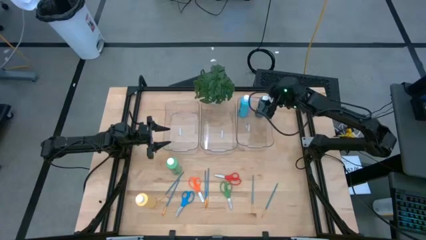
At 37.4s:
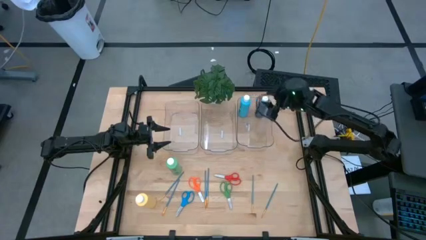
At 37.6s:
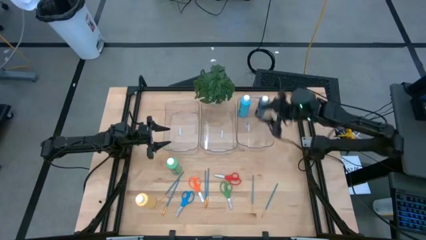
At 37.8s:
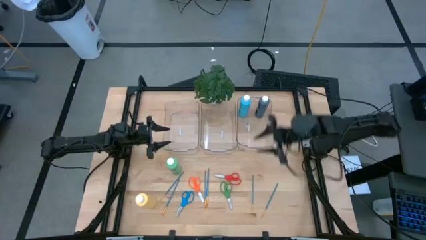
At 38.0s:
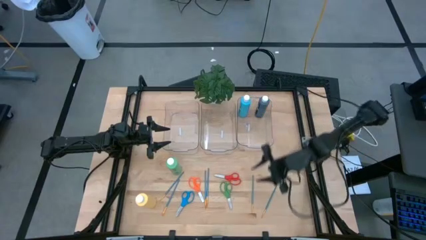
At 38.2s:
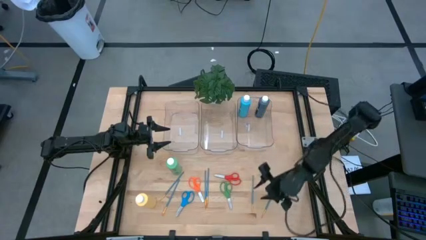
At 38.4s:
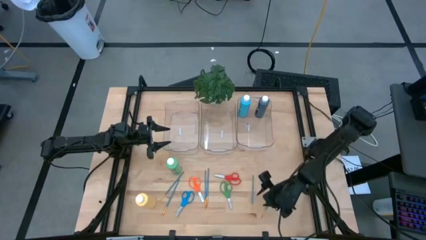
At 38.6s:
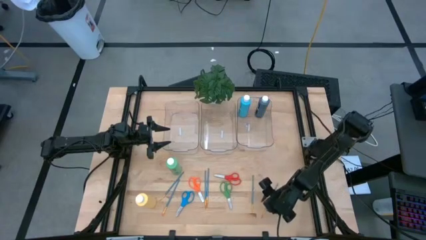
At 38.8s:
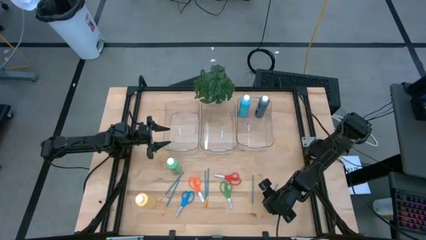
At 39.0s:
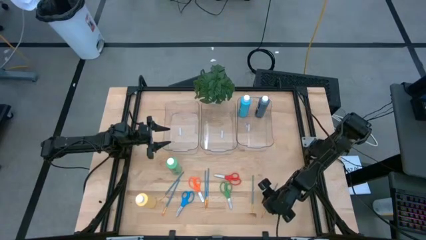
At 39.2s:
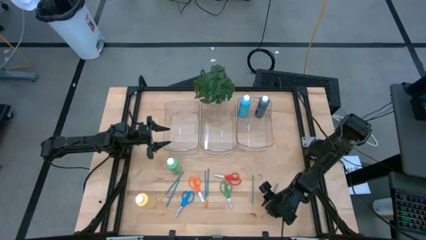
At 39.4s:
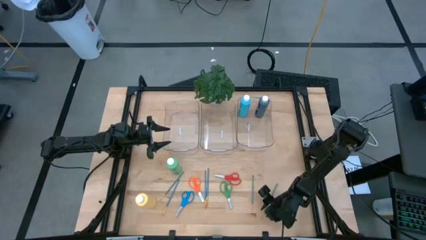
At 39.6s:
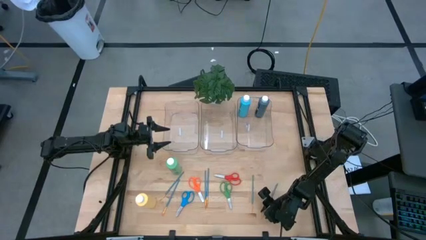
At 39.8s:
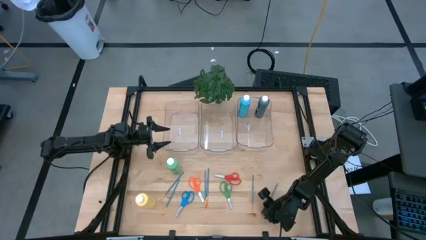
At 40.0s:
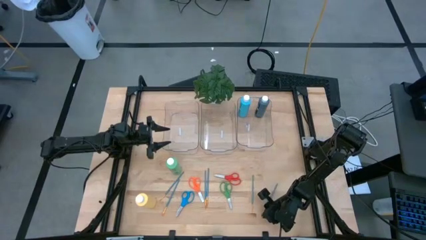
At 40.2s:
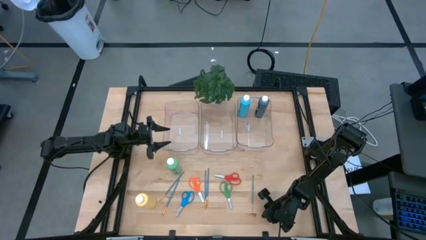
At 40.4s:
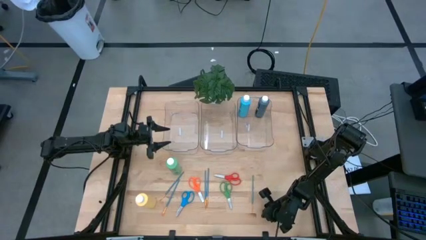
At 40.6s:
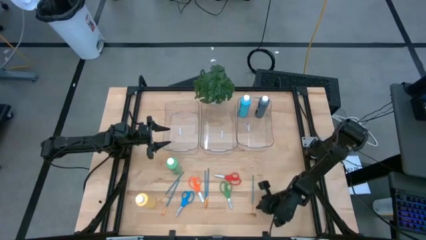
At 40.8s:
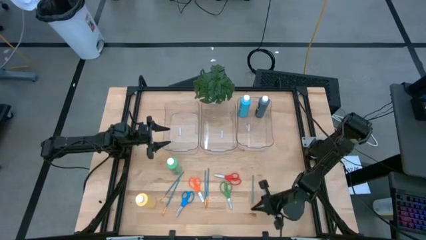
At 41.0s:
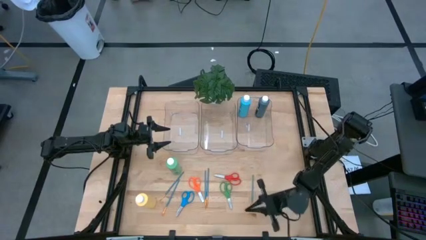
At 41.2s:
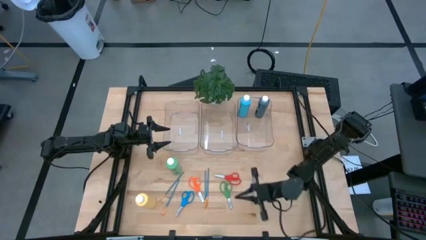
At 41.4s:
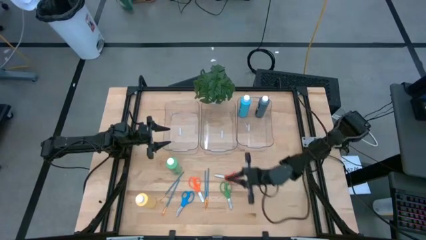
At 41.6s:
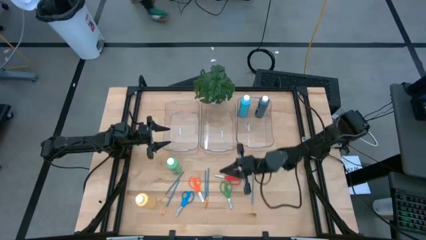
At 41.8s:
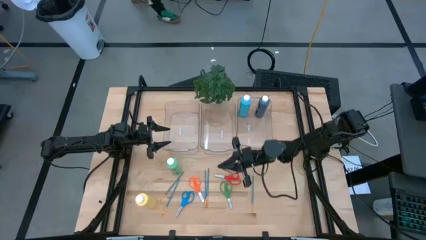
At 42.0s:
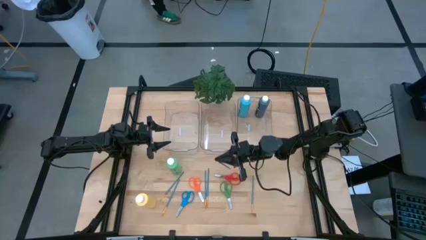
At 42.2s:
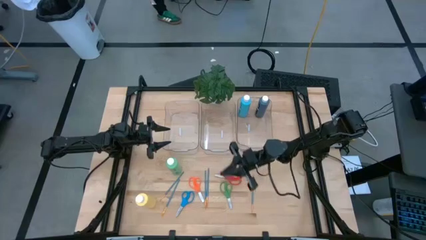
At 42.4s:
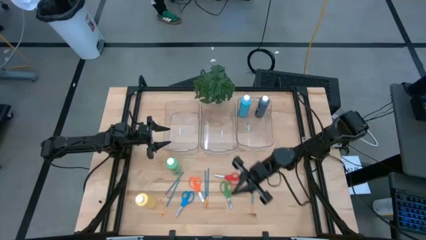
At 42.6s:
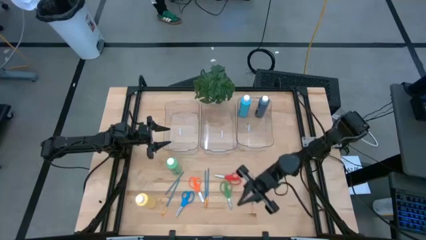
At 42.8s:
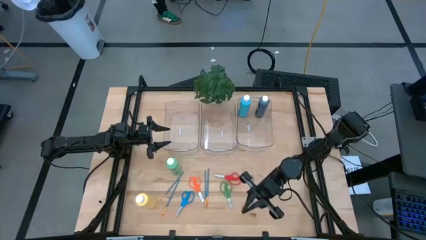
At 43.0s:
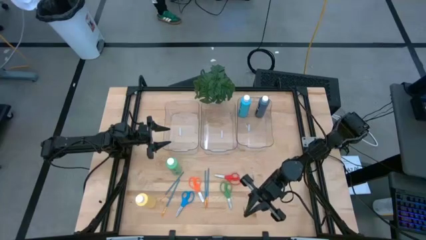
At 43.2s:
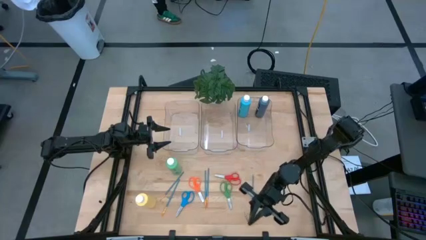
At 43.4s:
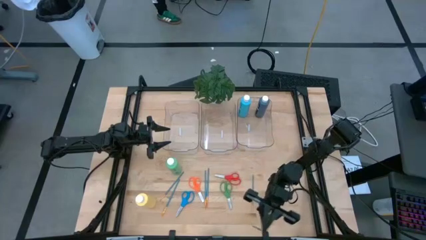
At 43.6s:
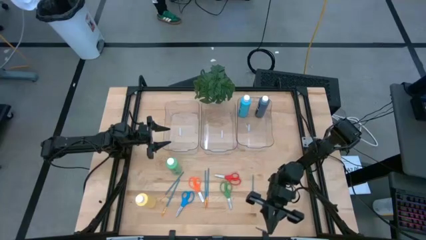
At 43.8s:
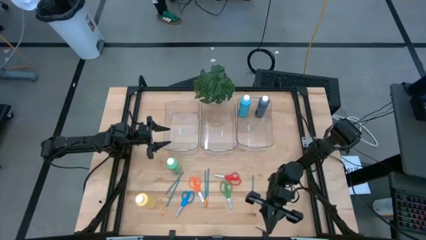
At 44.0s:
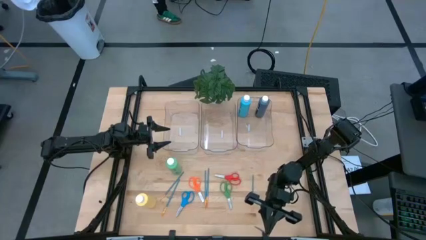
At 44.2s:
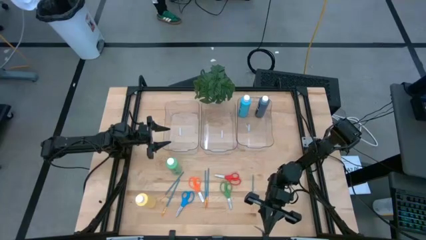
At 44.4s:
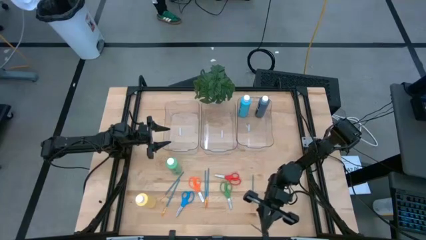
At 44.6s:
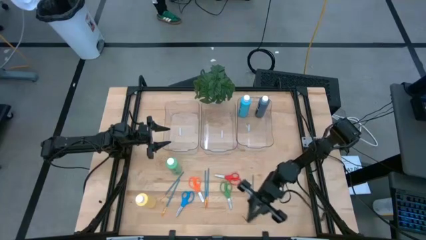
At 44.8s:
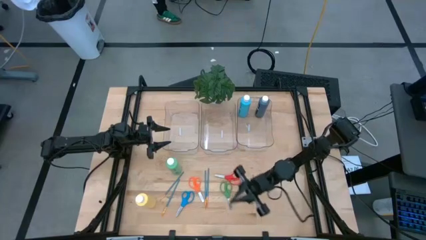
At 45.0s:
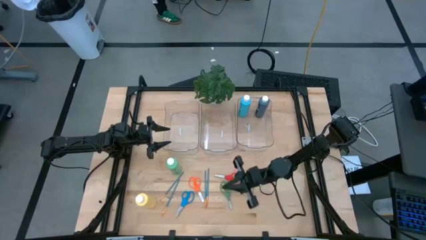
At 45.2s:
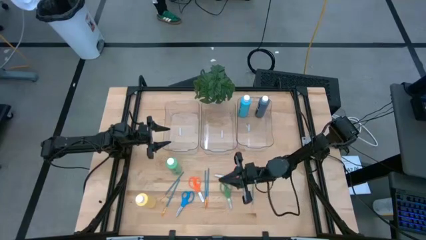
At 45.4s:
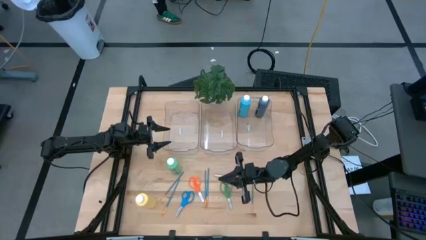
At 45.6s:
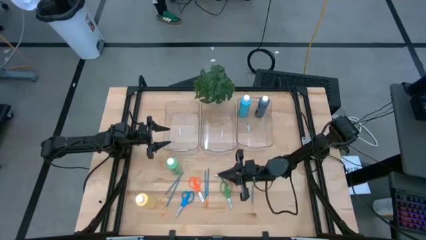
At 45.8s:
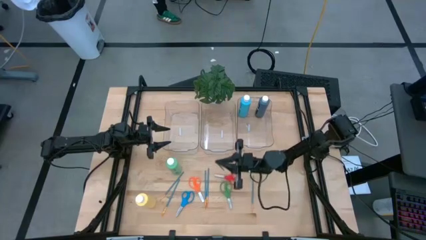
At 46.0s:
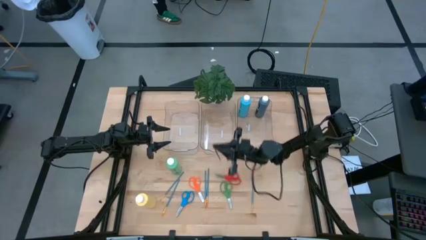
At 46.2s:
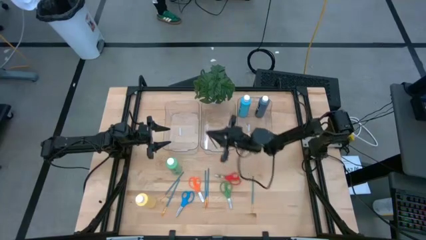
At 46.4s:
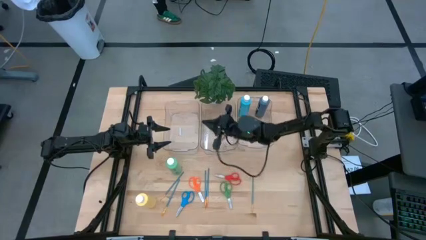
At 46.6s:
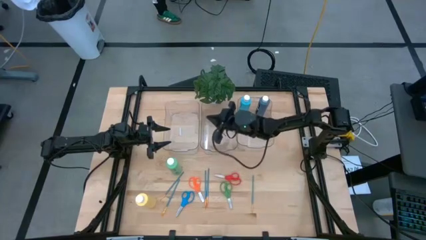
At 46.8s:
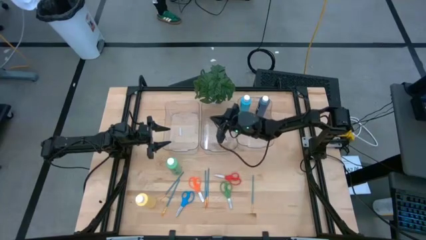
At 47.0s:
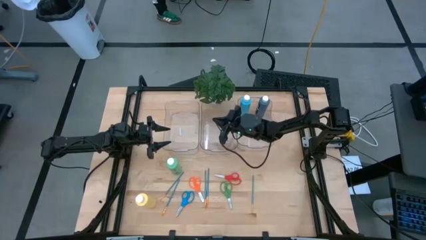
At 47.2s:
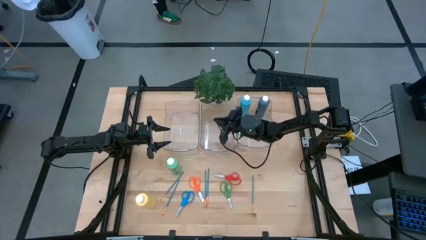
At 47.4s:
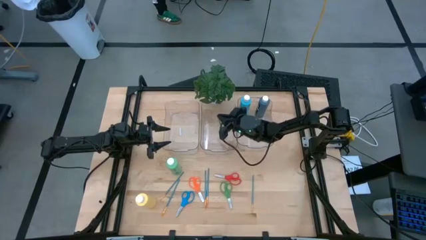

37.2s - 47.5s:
Task: Pick & Place Paint Supplies
Put the blue paintbrush into the middle transparent bin

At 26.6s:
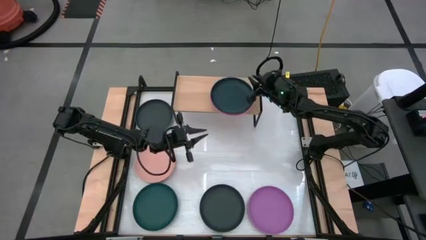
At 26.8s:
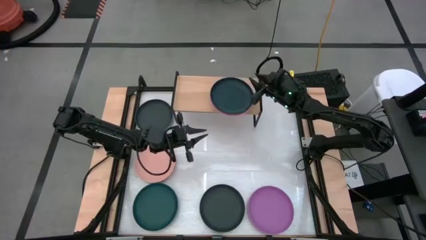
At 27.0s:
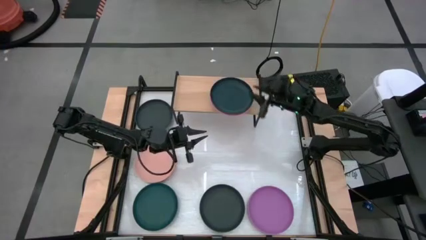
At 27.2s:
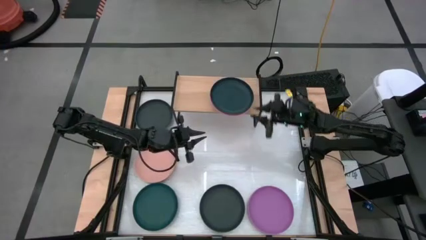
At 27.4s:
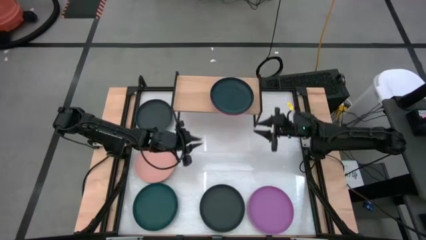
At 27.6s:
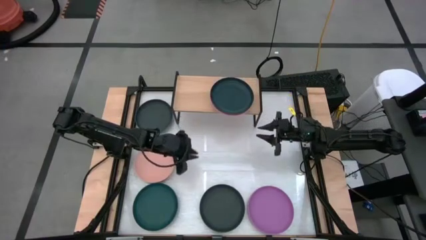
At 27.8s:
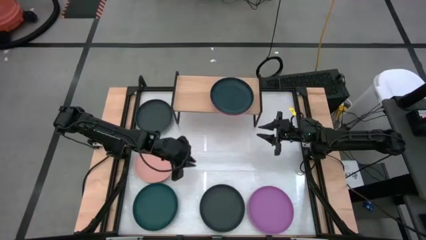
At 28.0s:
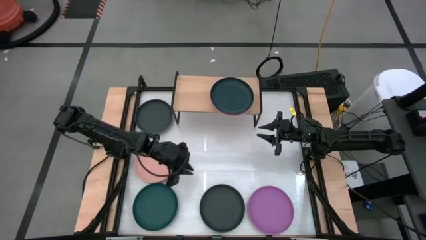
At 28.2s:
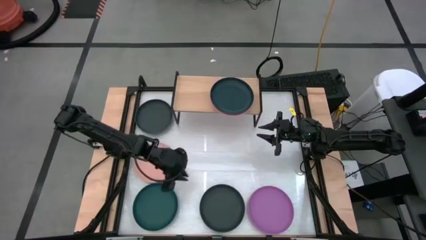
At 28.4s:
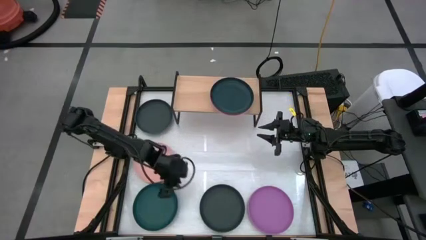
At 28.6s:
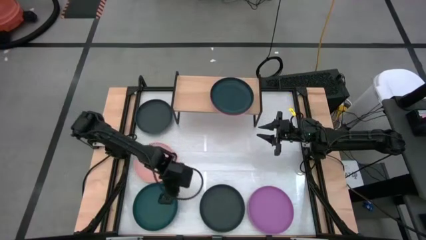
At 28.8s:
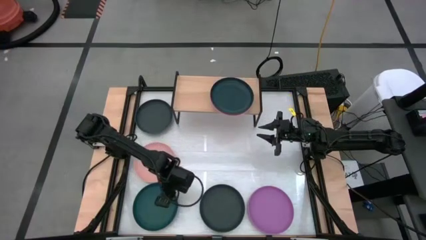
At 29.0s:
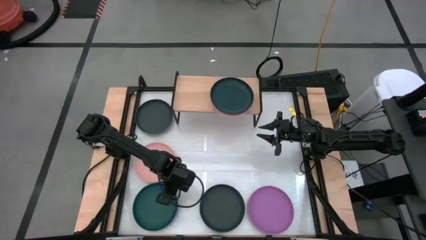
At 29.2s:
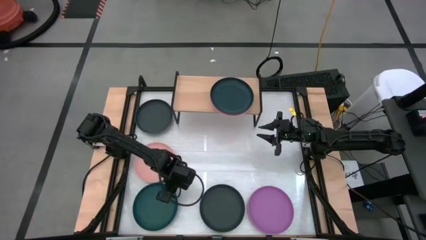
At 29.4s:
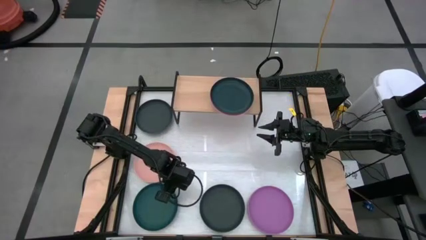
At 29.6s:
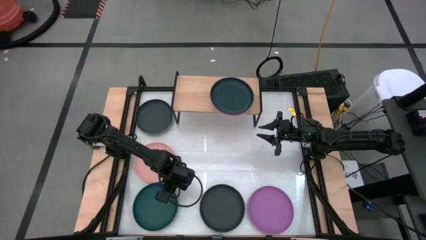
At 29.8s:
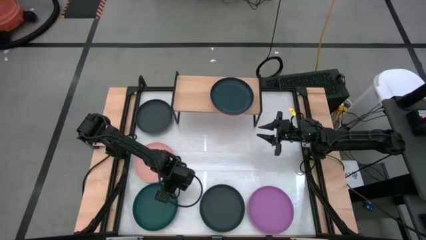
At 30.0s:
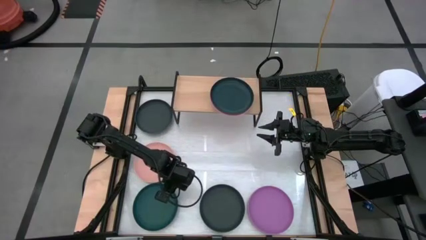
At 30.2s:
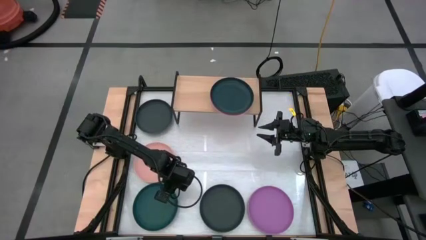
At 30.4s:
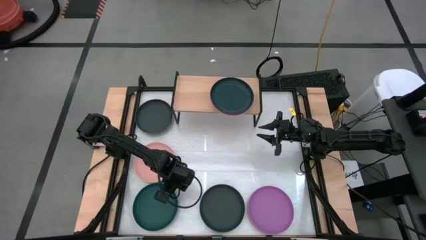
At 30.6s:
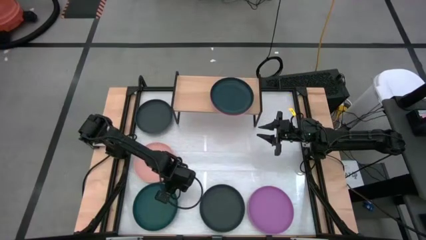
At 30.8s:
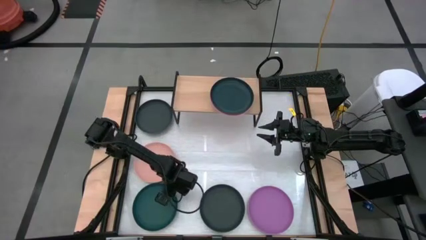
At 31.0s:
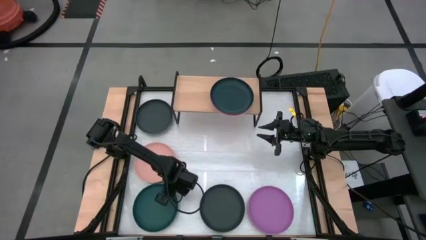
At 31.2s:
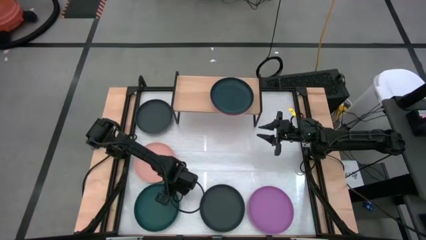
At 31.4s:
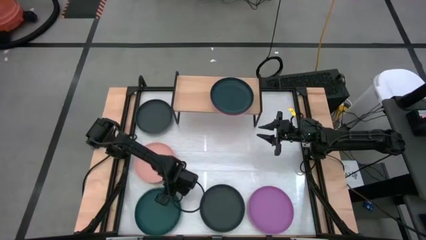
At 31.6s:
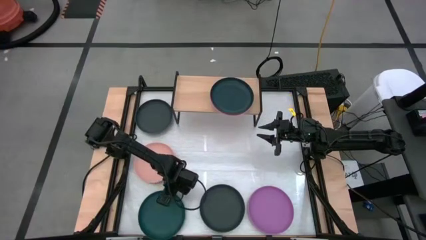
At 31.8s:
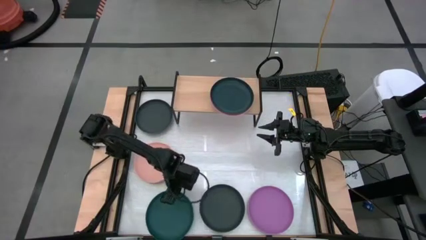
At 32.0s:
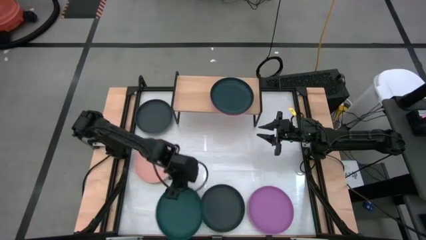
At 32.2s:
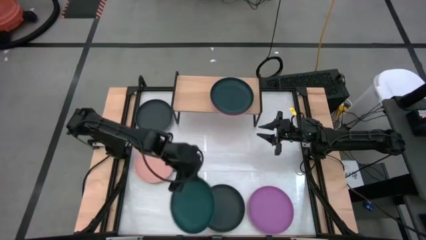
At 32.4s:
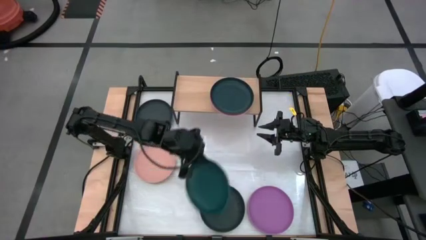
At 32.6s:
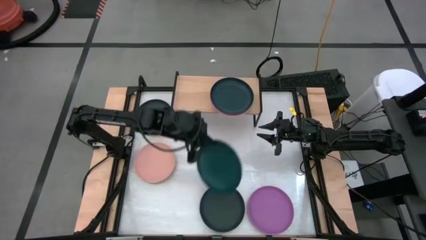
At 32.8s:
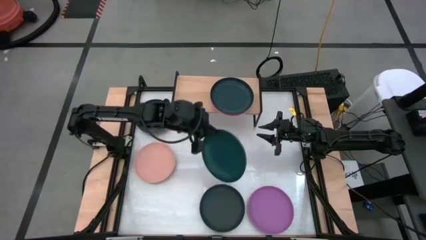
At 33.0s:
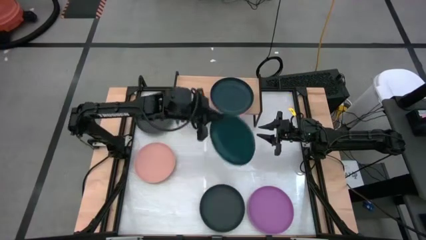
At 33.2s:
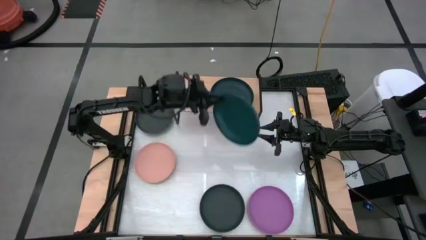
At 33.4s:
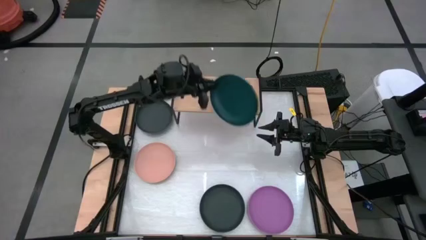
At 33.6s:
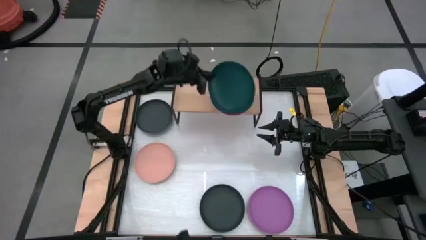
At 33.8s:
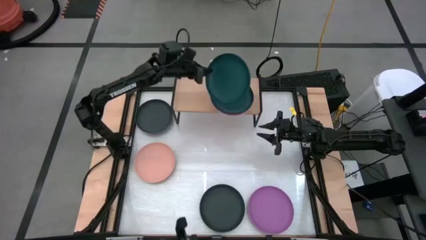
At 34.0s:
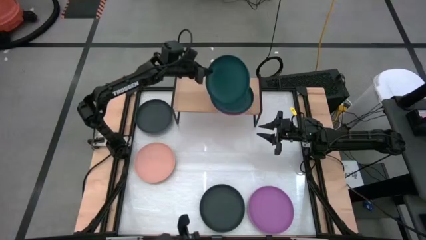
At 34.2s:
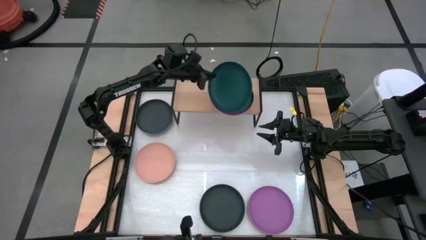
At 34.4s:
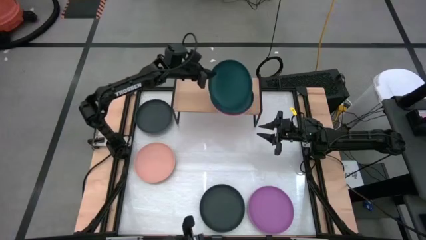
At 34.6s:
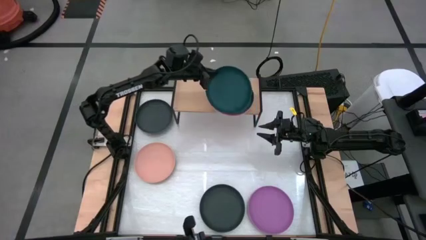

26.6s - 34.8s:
Task: Place and stack plates onto a shelf
Stack the dark green plate onto the dark blue plate on the shelf
